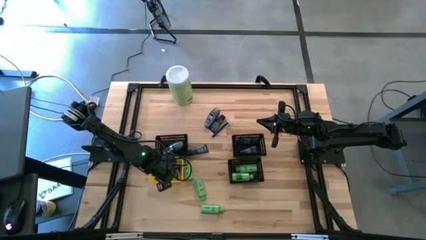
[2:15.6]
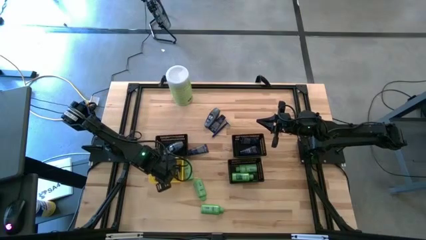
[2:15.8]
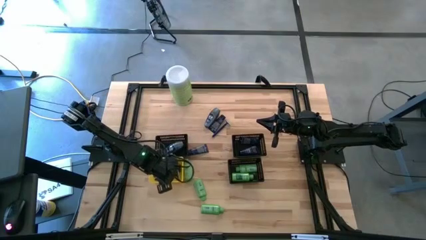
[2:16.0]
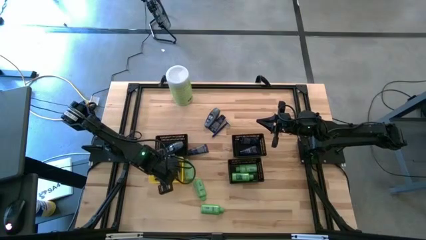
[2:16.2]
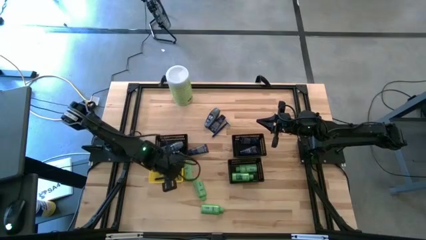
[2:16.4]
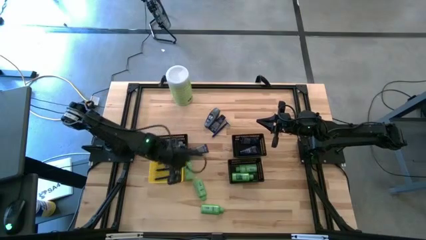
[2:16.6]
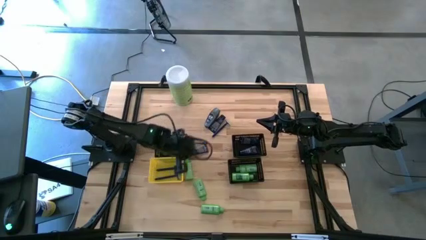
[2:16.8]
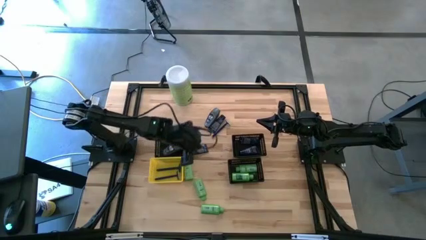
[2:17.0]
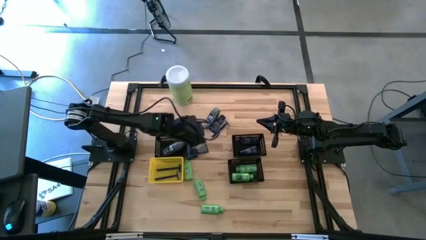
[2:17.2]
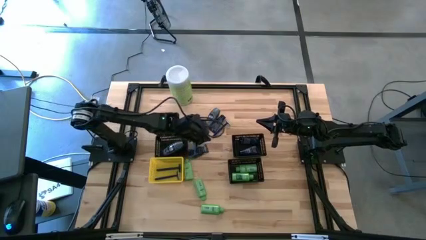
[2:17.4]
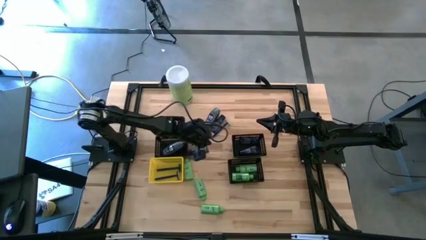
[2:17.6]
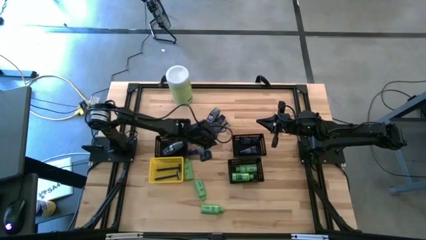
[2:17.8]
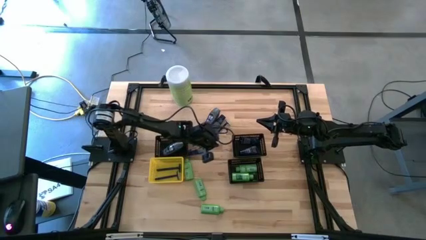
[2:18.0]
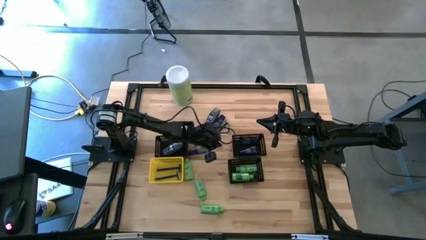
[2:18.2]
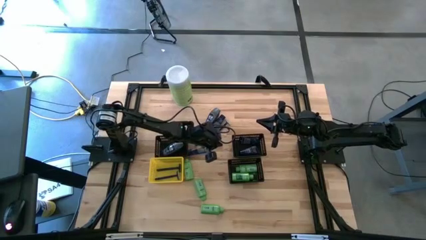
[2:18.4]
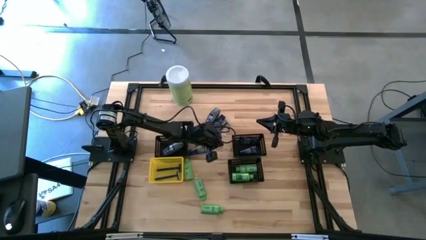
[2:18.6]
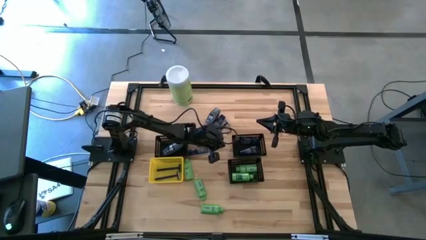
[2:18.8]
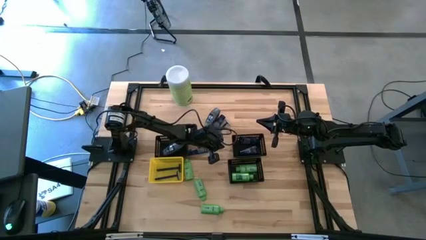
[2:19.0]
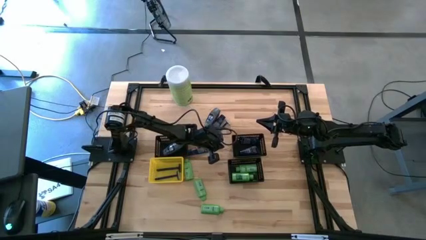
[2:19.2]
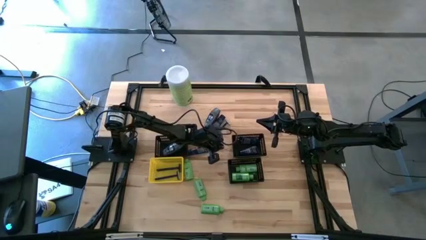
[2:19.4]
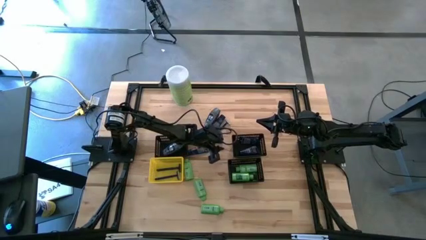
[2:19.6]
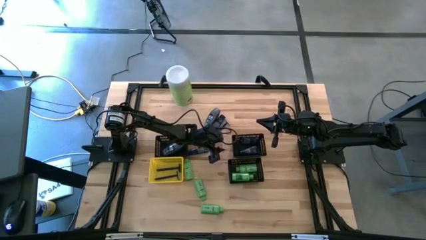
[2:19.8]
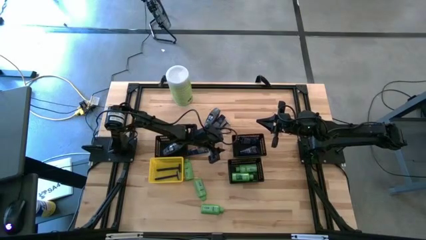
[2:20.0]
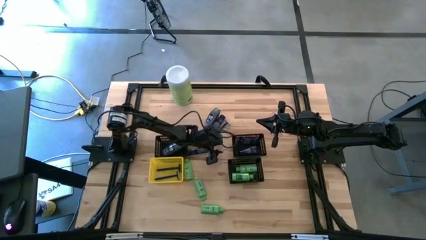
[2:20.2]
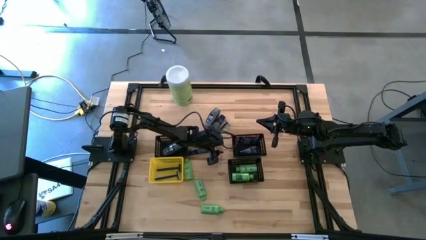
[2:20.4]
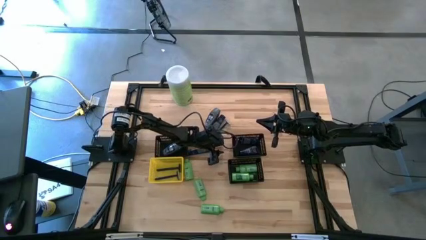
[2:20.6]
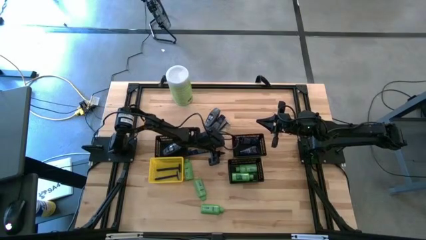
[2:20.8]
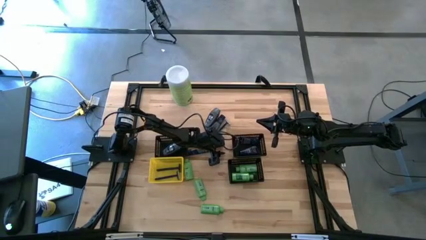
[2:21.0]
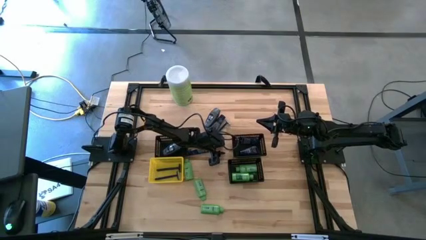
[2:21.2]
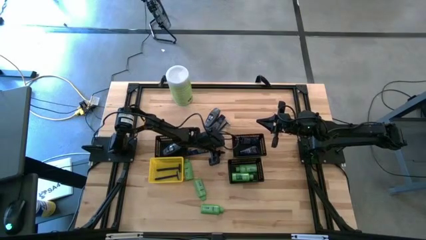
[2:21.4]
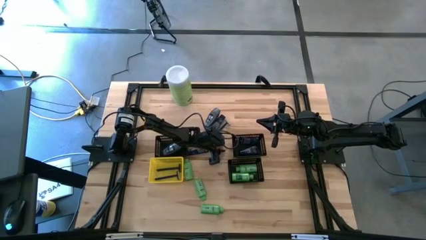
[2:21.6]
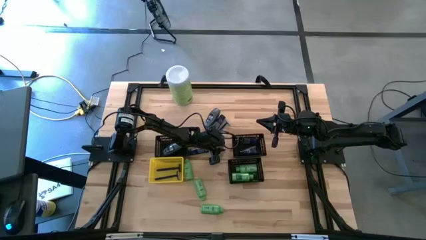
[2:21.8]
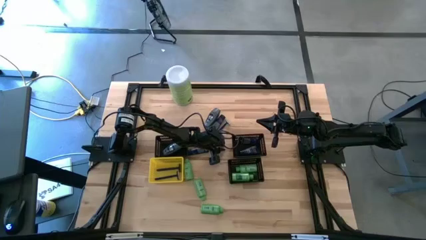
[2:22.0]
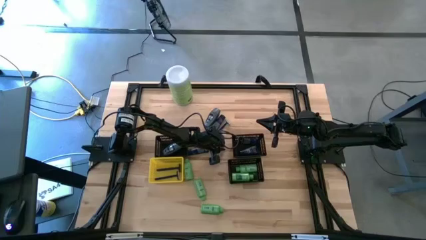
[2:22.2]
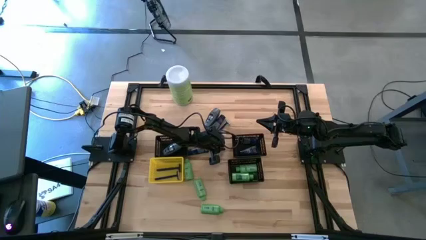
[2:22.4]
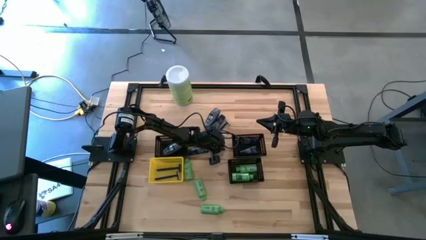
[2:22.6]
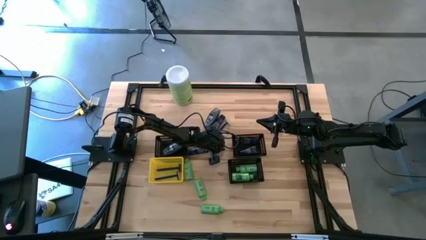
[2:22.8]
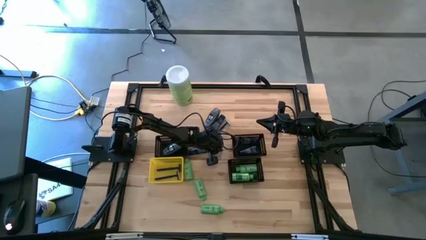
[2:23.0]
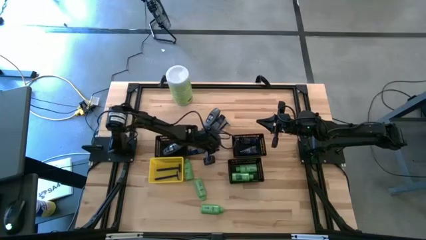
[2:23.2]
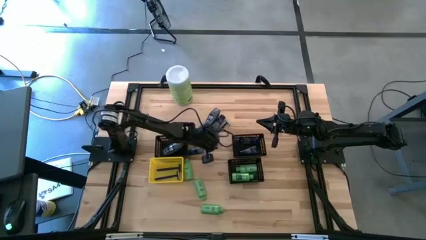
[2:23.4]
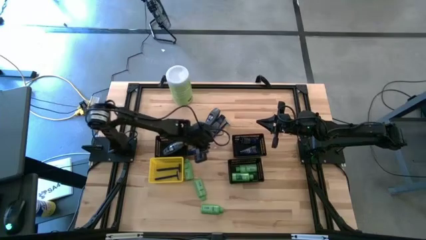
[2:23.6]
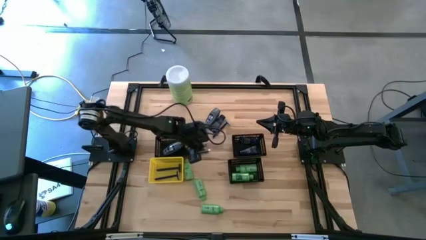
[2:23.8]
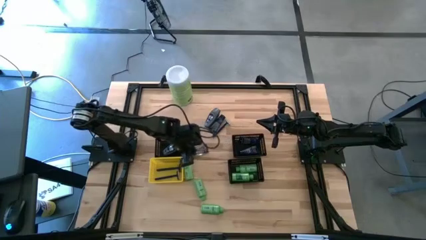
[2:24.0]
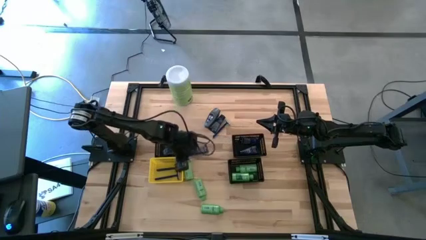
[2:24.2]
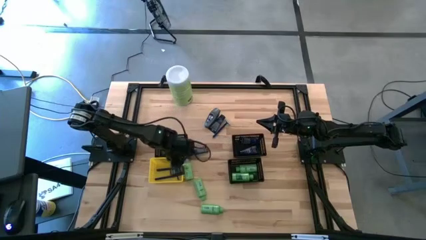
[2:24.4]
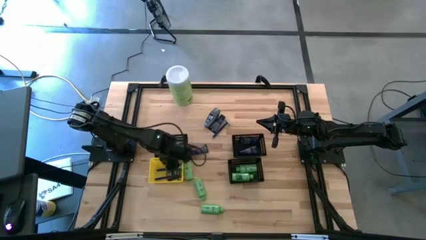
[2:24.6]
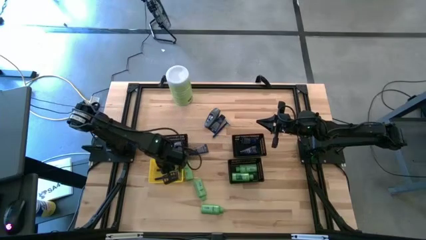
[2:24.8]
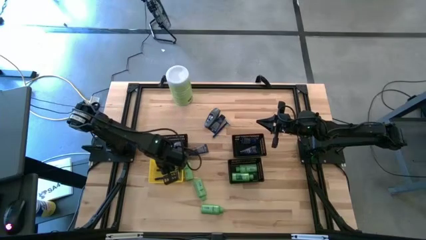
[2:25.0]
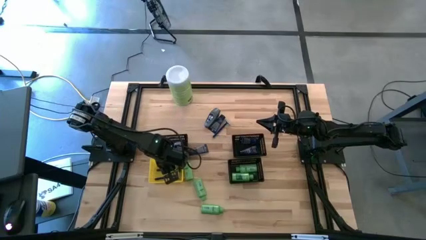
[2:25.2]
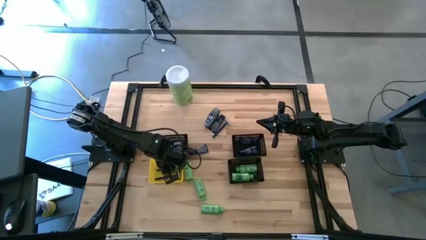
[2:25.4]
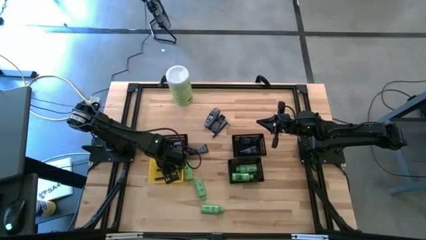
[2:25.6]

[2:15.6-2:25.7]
Task: Pick & Place Travel size toiletries
Put the clear razor cover into the yellow bin
